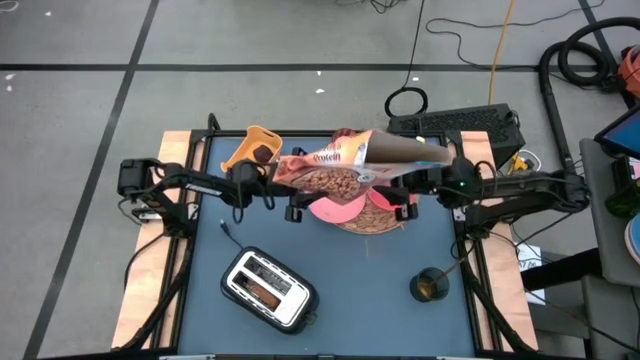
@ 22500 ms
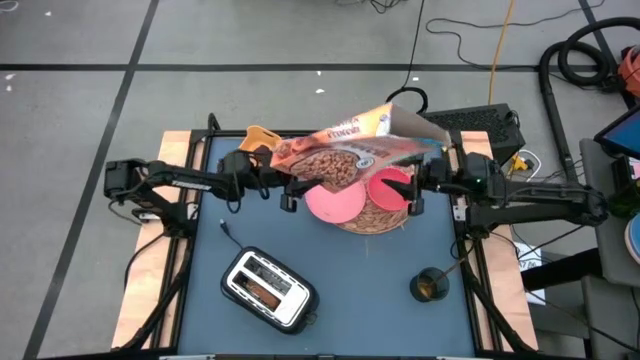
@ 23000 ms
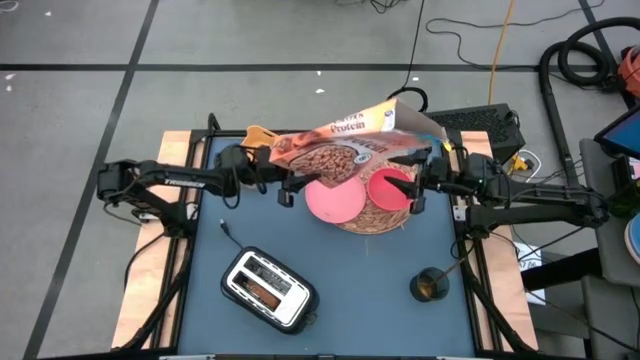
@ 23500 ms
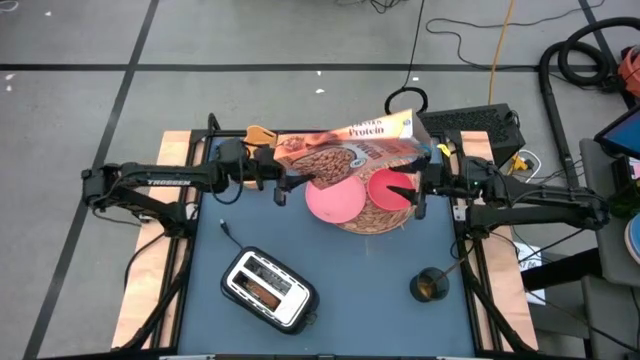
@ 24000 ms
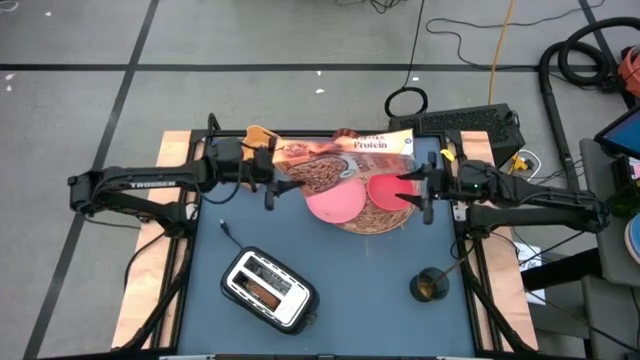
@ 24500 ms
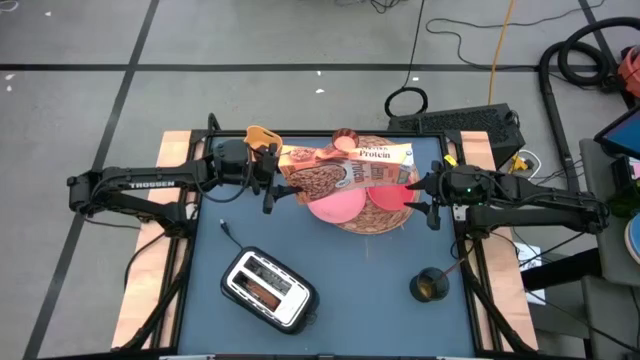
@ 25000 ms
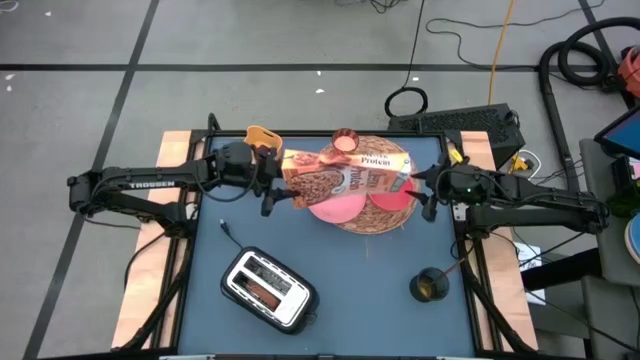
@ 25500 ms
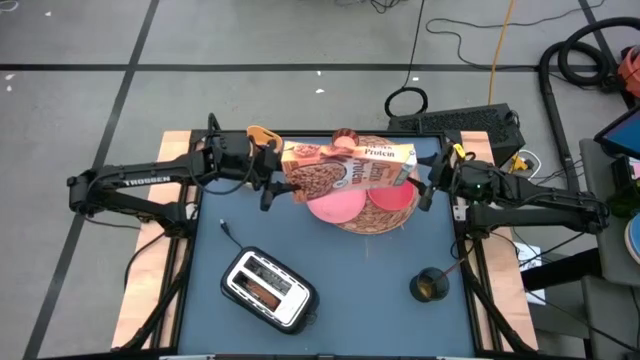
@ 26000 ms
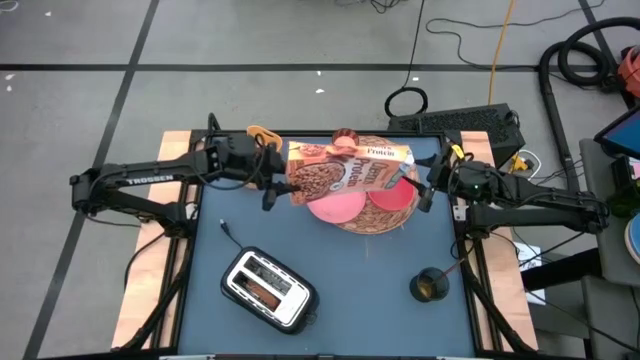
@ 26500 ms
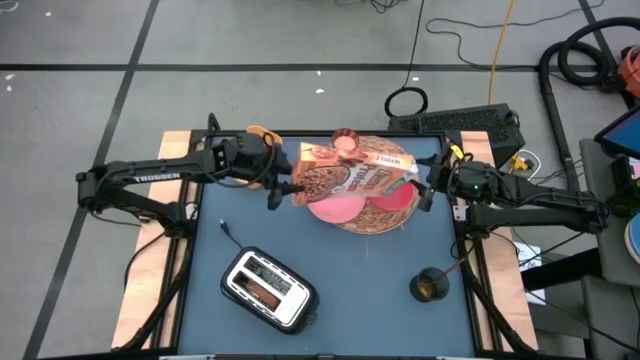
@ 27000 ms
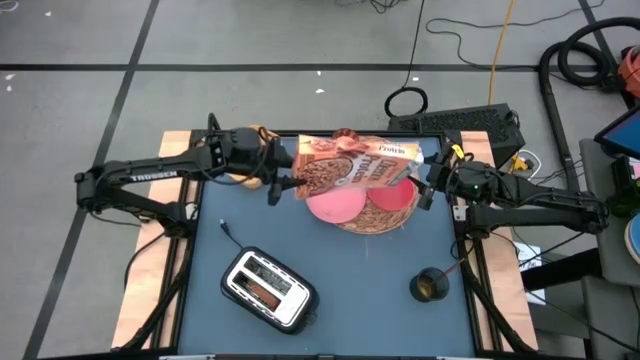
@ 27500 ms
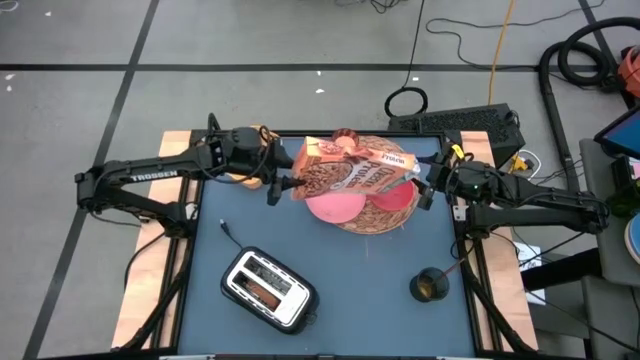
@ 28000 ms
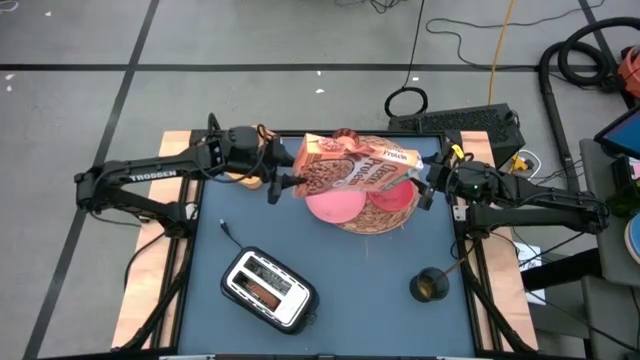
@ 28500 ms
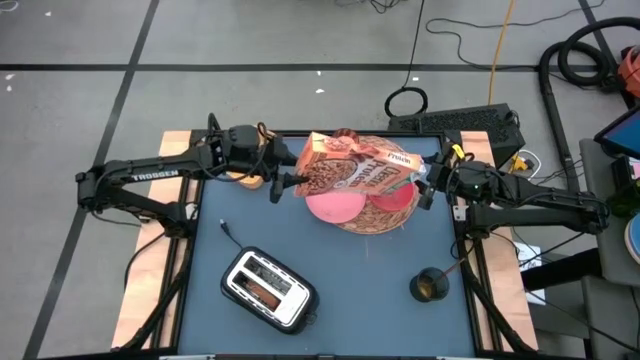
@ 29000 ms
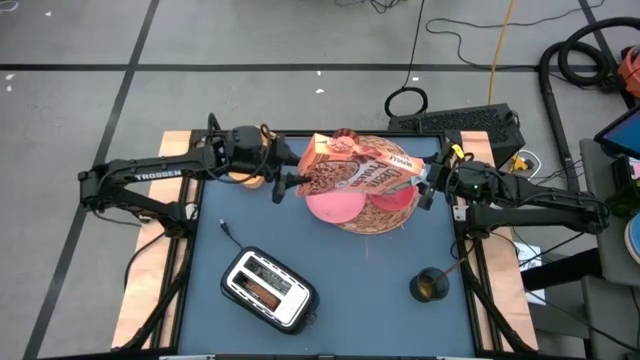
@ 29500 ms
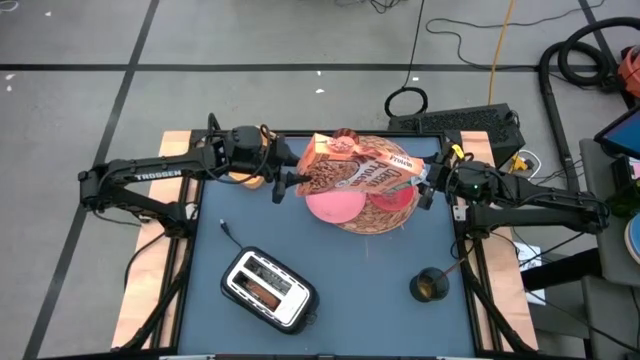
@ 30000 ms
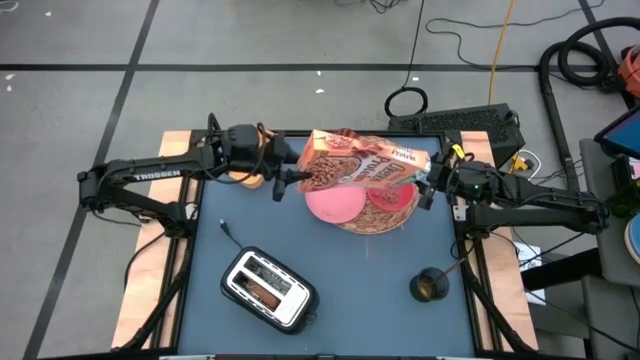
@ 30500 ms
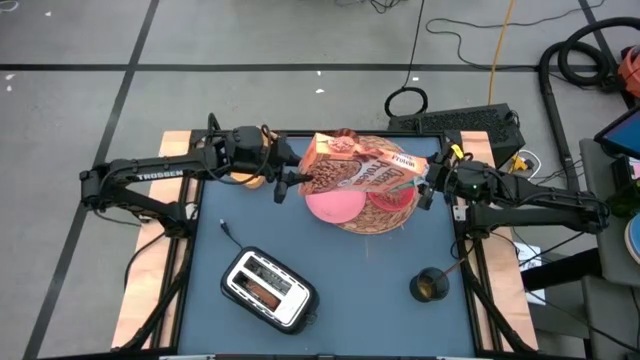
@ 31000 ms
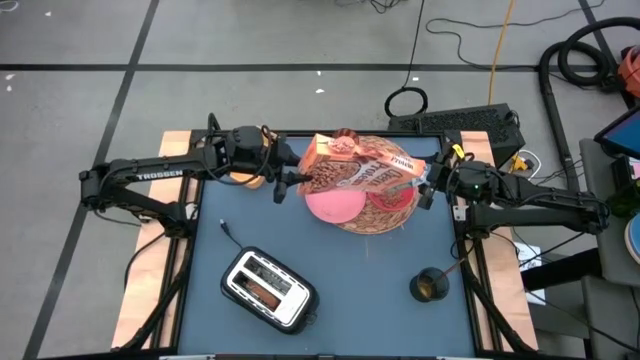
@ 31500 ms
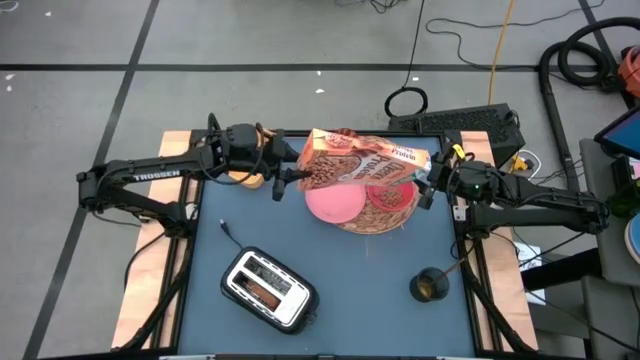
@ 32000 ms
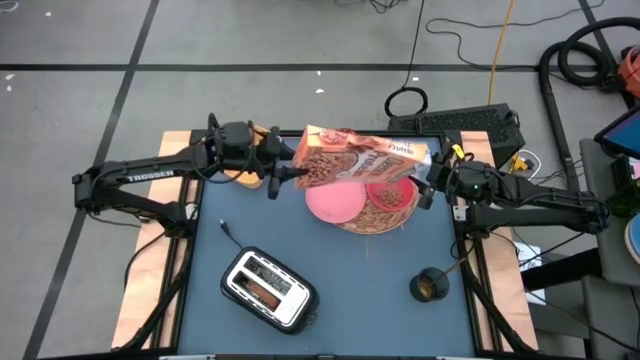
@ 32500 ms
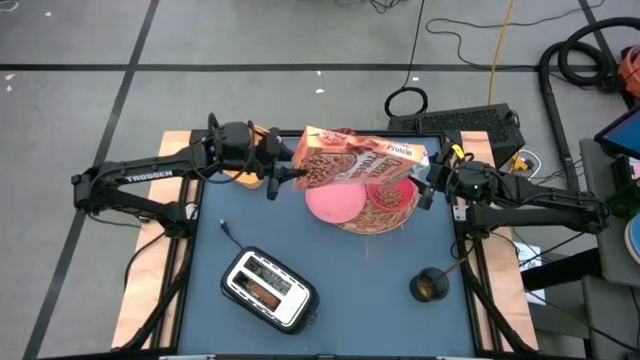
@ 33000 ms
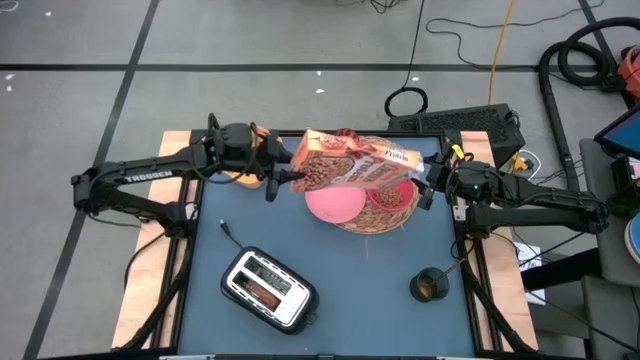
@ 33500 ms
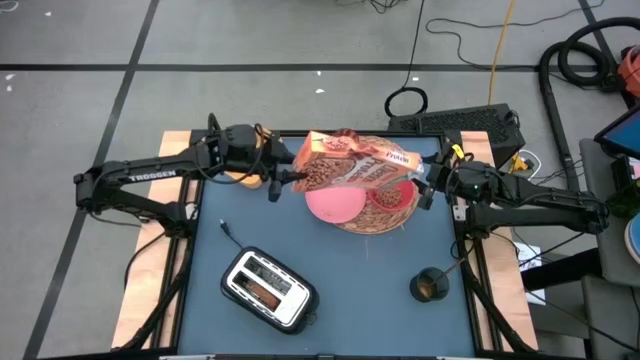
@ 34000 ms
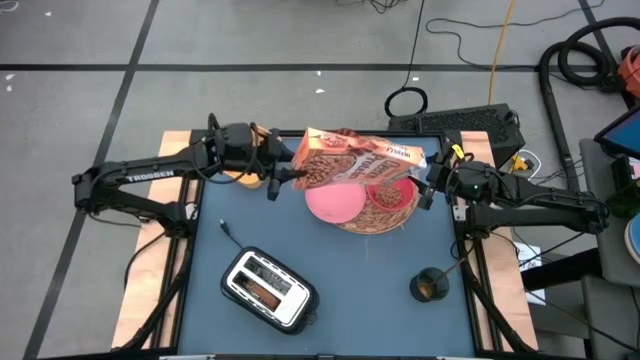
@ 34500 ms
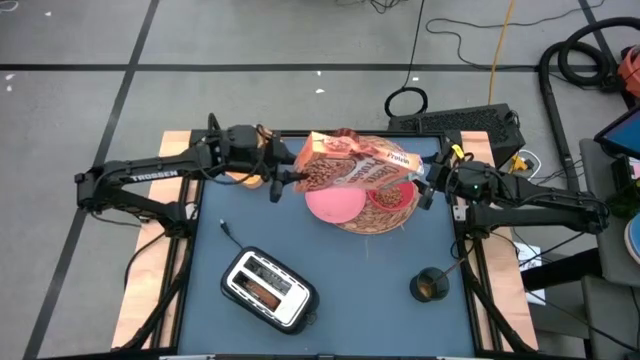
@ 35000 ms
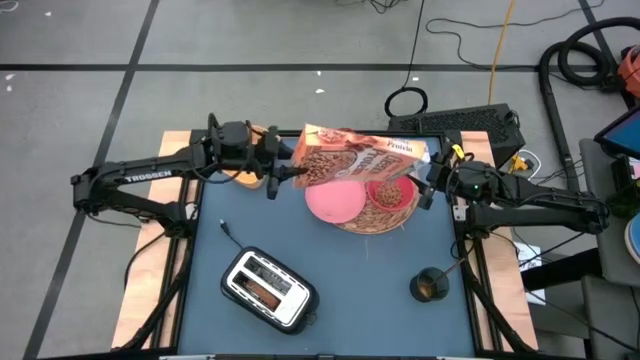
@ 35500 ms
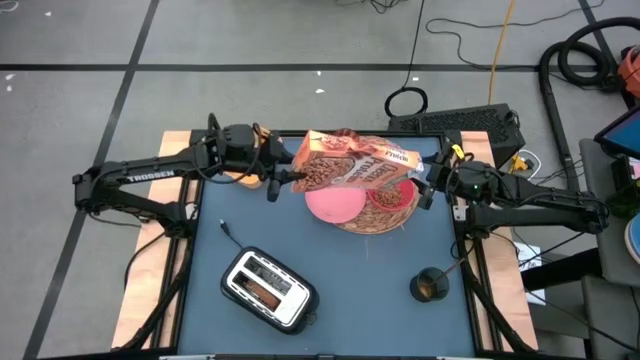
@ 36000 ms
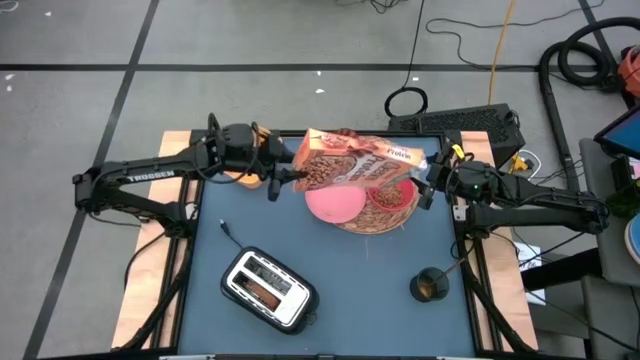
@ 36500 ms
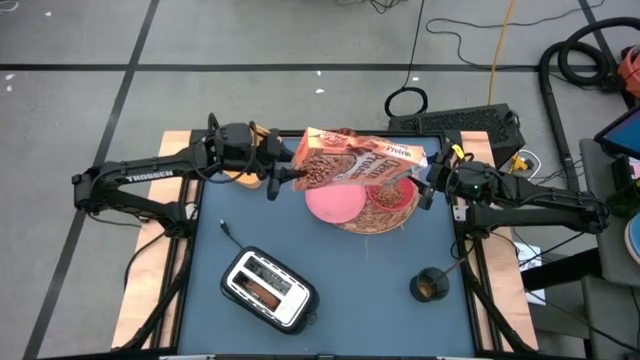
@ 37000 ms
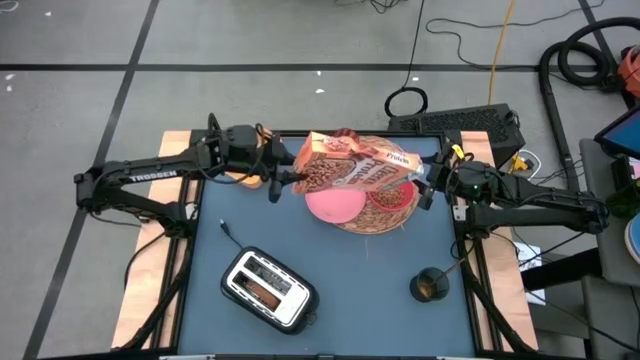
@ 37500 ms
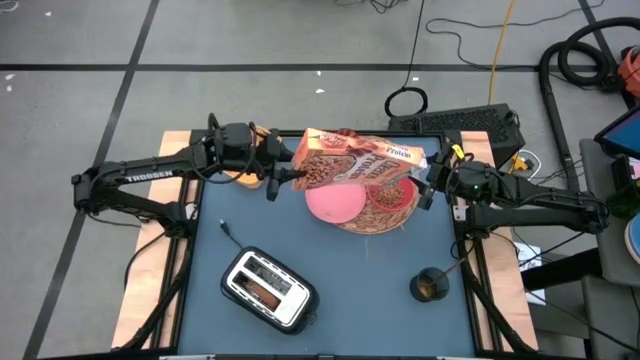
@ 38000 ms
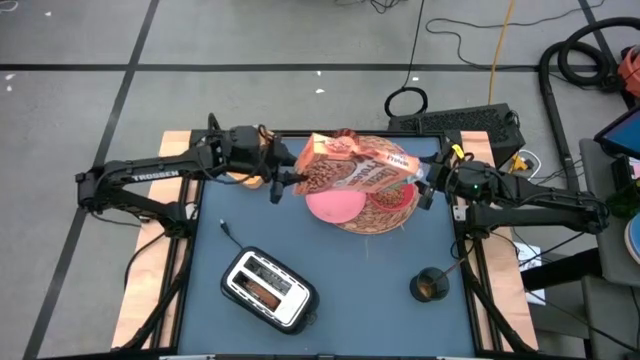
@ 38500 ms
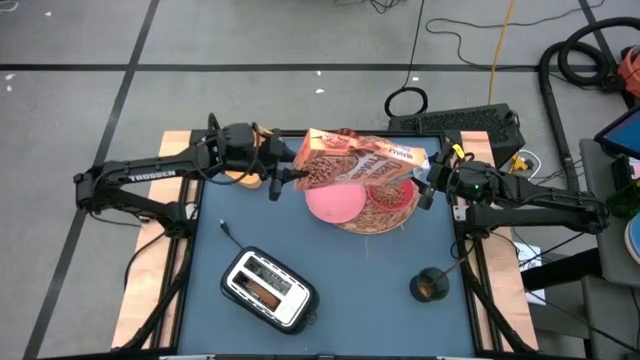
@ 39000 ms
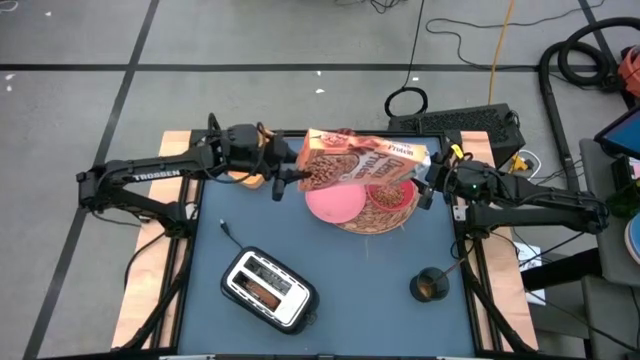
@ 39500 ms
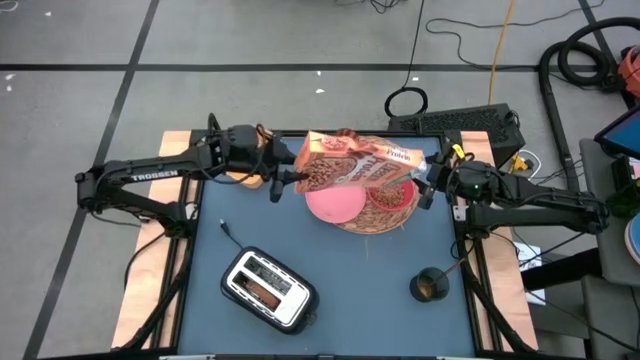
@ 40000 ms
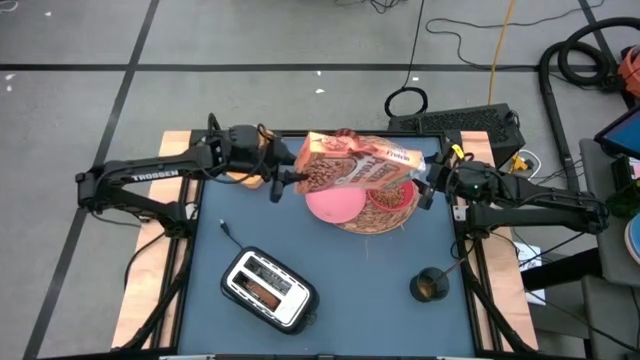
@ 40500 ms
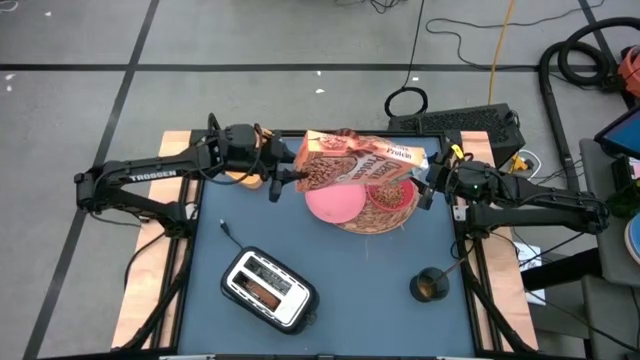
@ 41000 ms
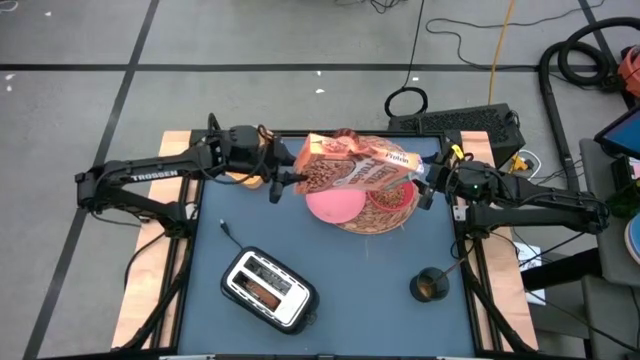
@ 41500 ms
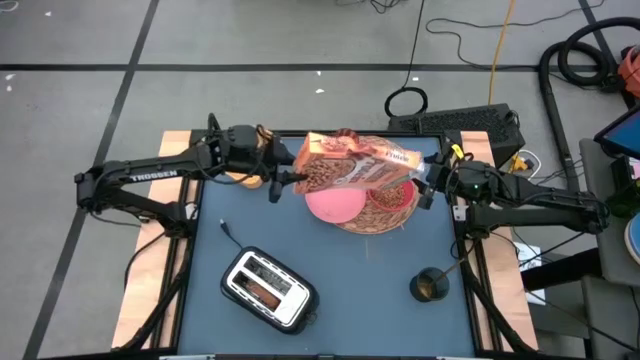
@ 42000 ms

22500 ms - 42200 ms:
Task: Arrange a breakfast setting
Pour the cereal from the cereal box into the red bowl
